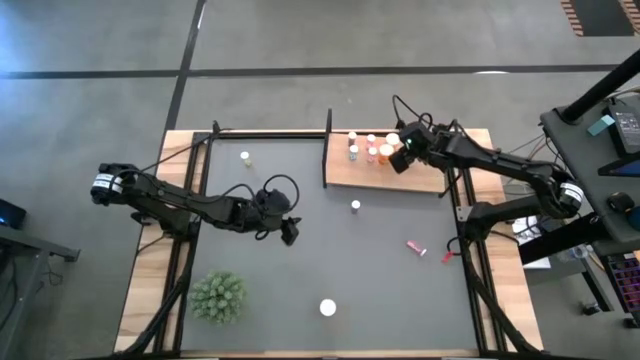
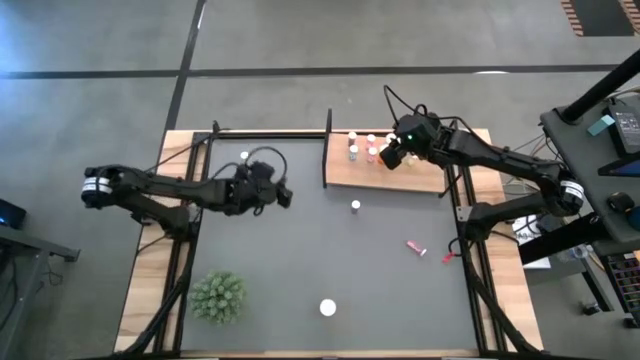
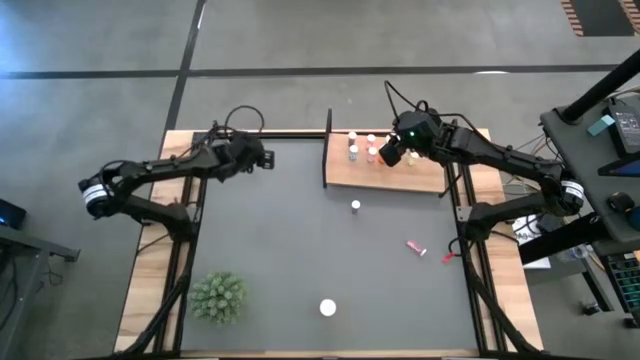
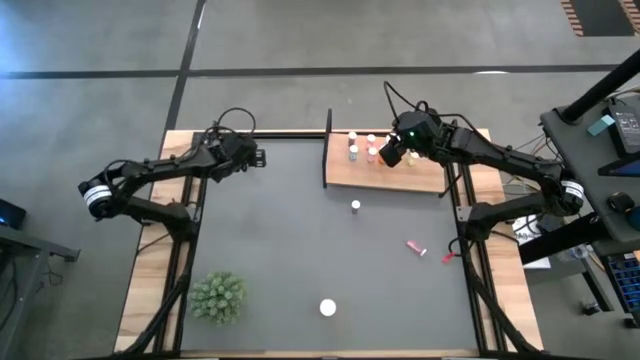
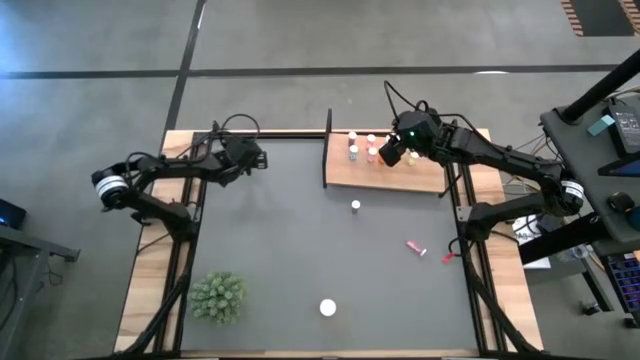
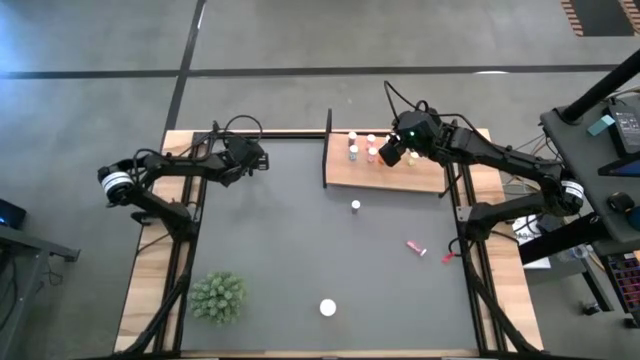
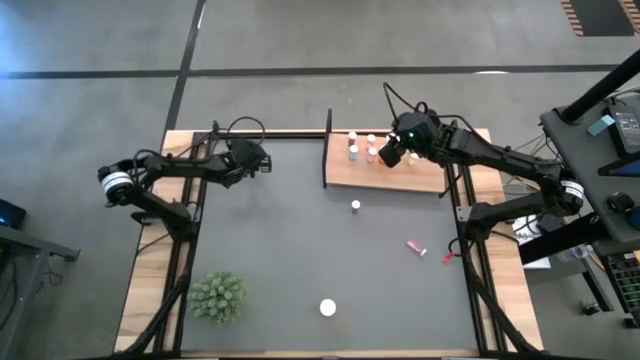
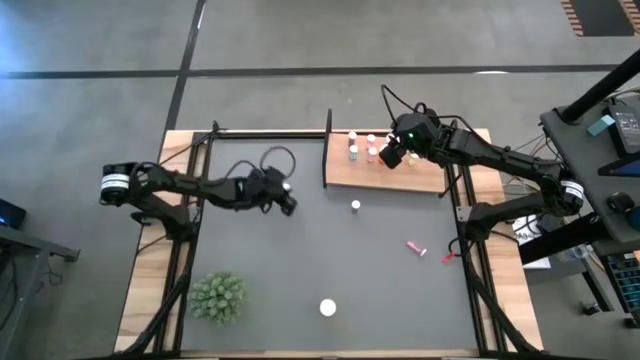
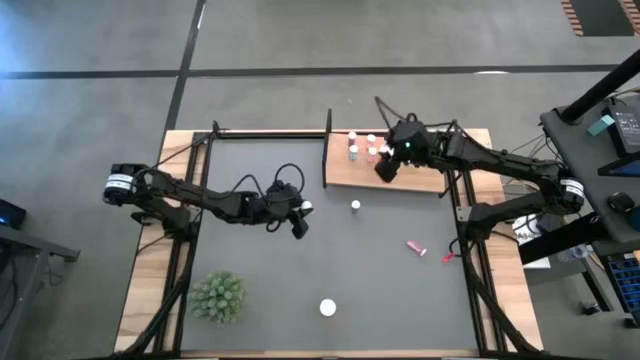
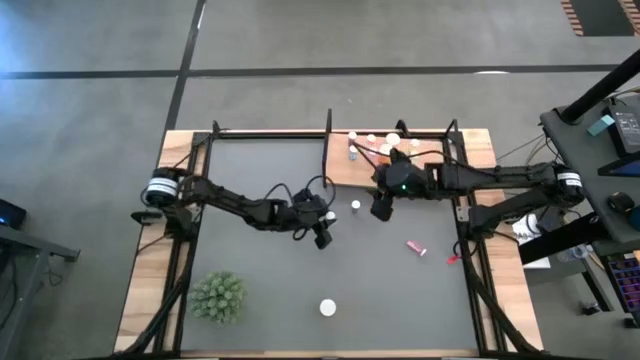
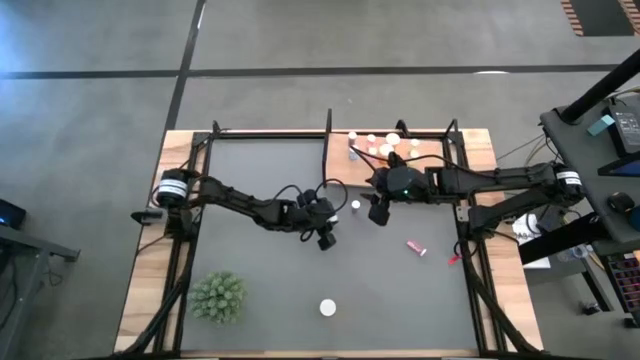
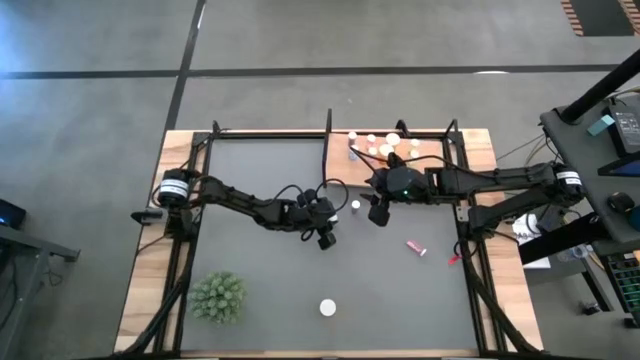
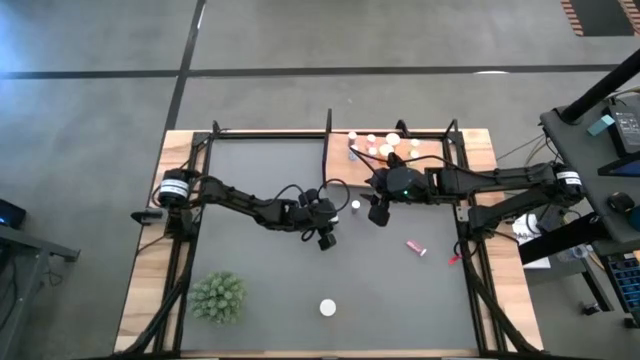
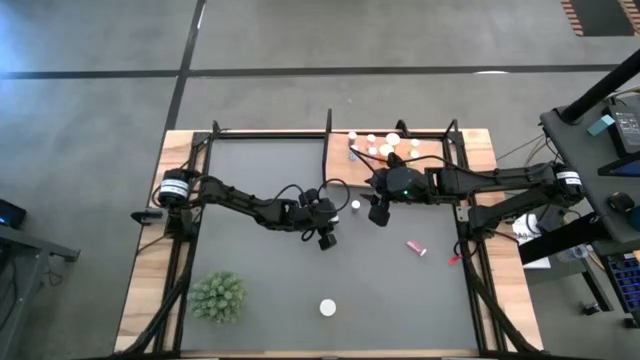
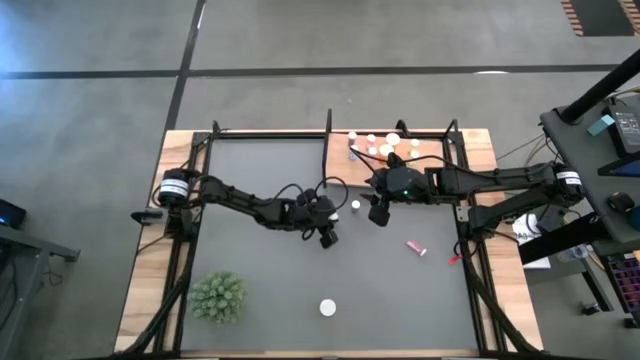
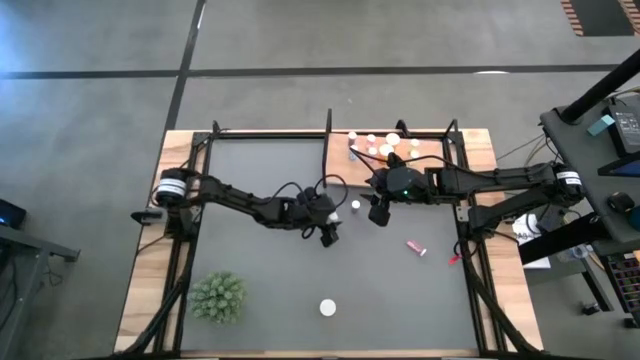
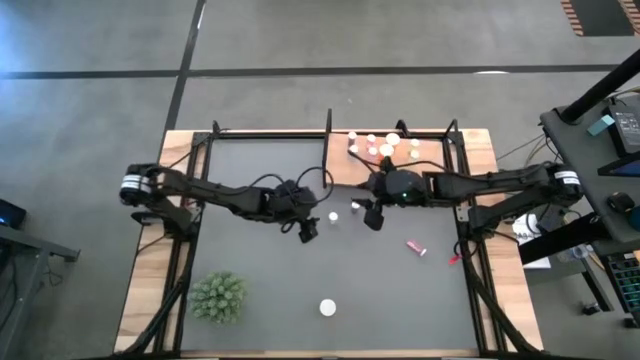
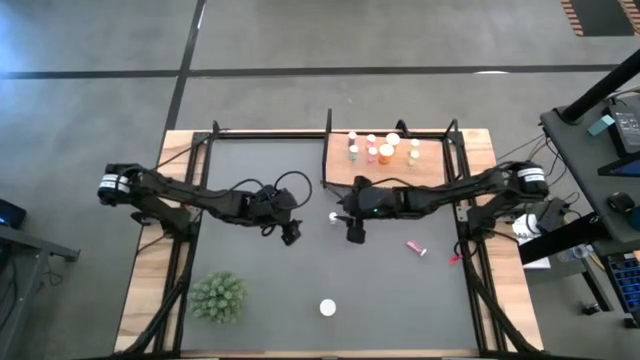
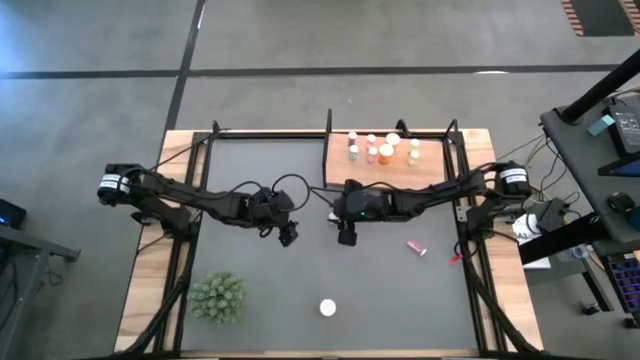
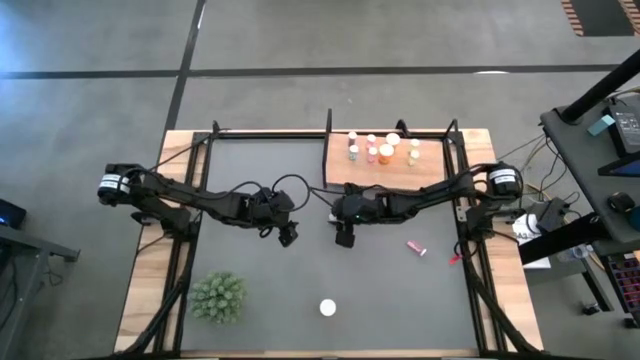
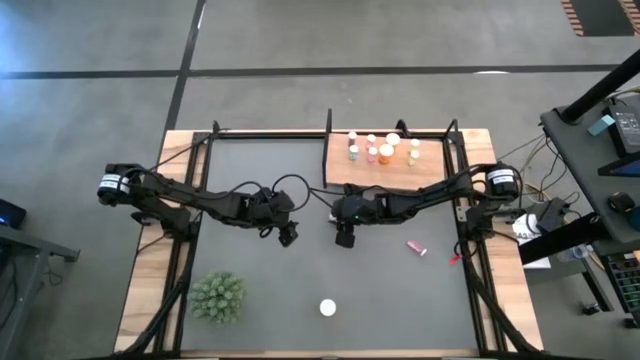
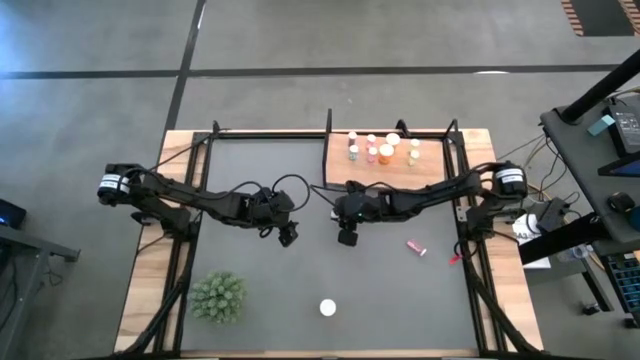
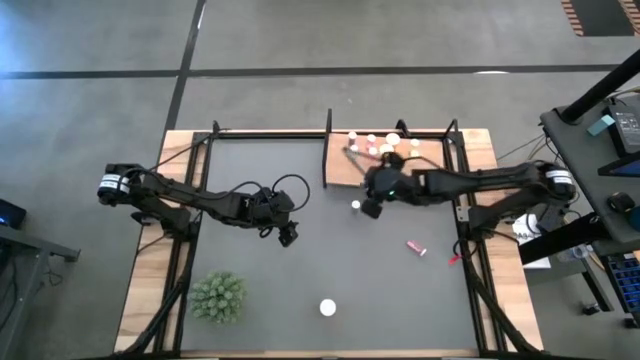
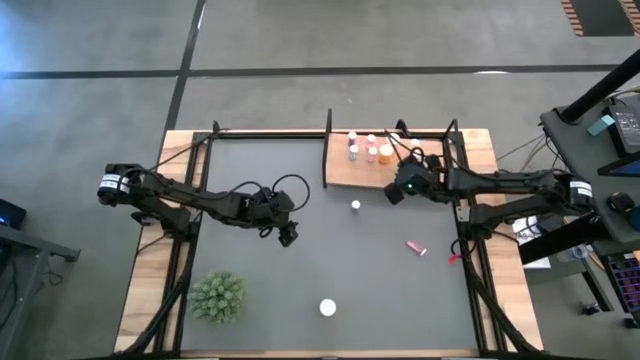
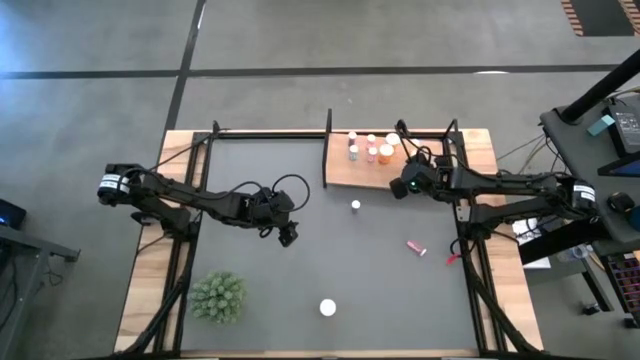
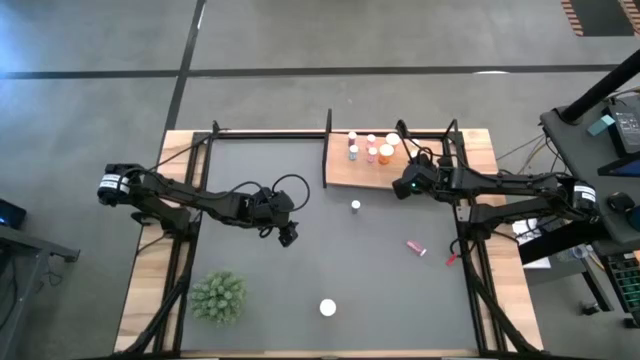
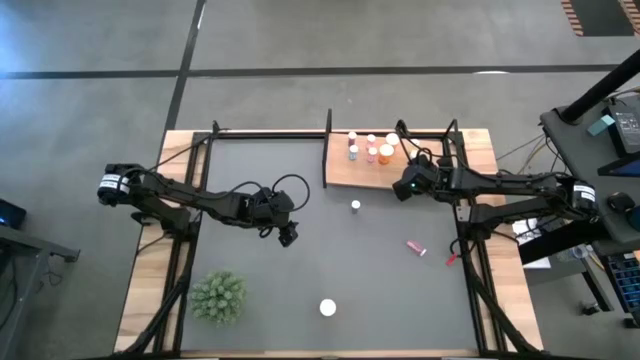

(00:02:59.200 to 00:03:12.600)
Task: Pick and place medicine bottles onto shelf by color
Put the yellow pill bottle on the shelf aligned with the other yellow pill bottles

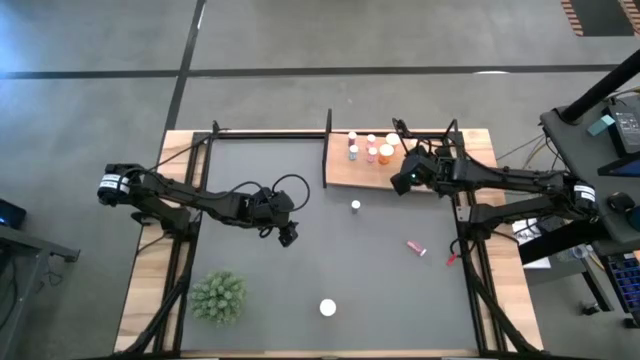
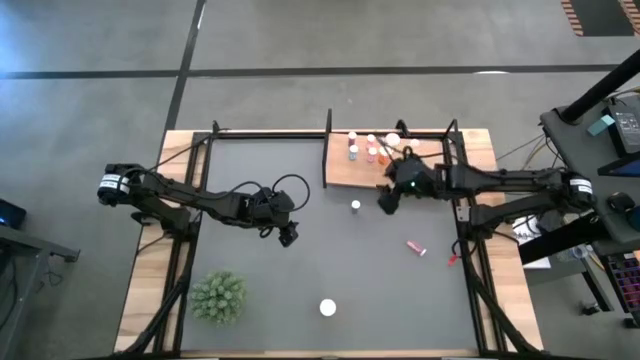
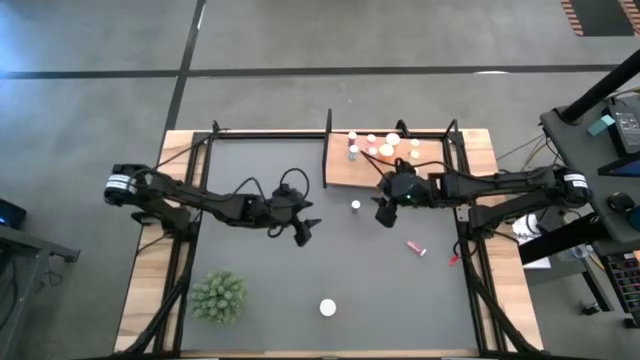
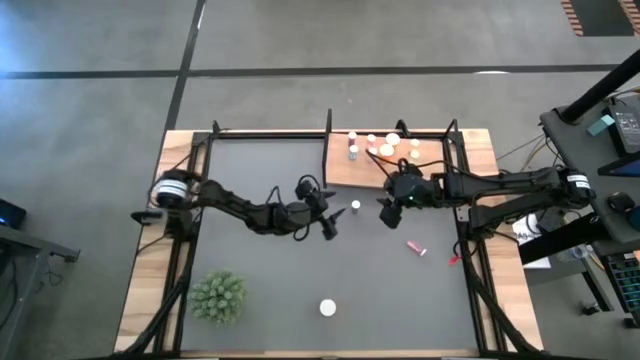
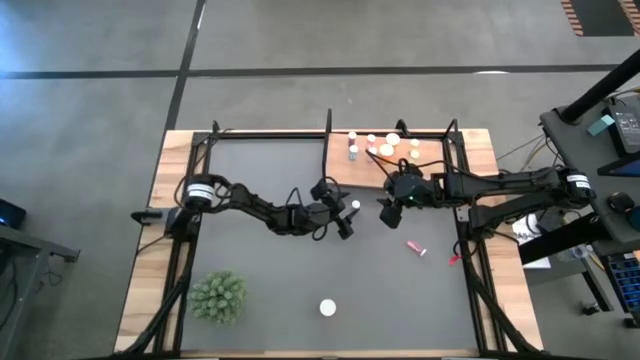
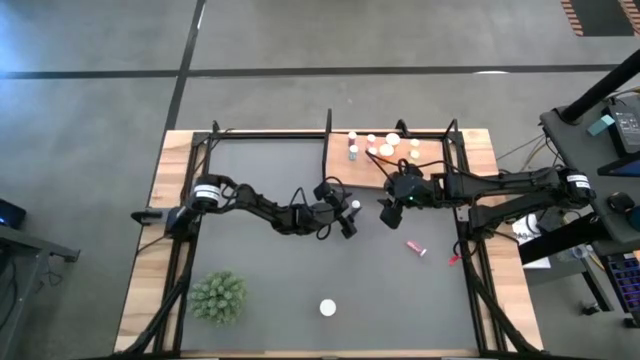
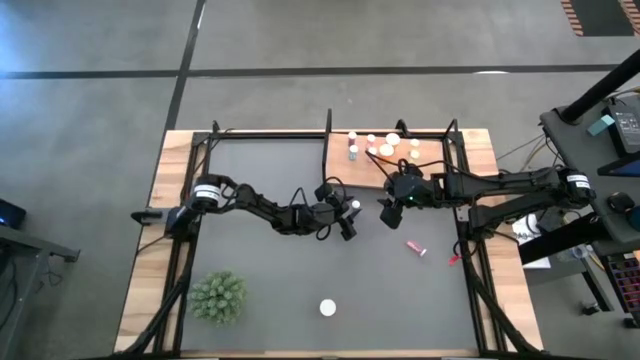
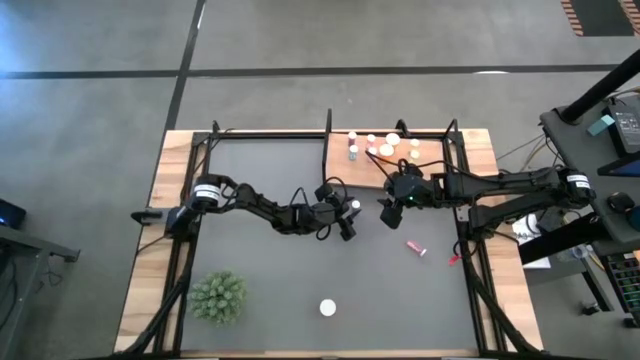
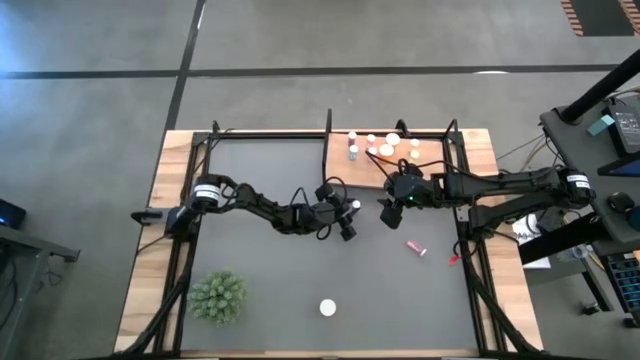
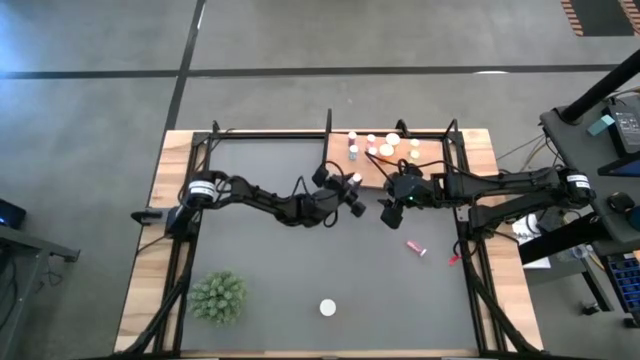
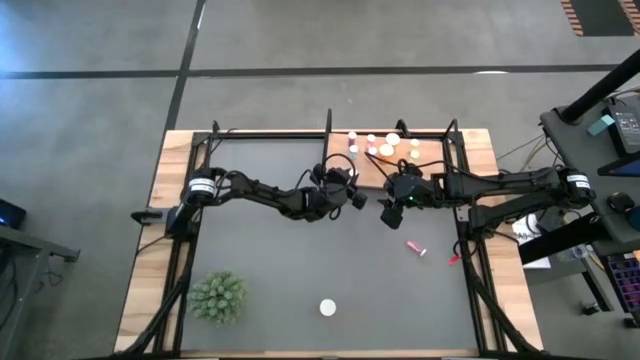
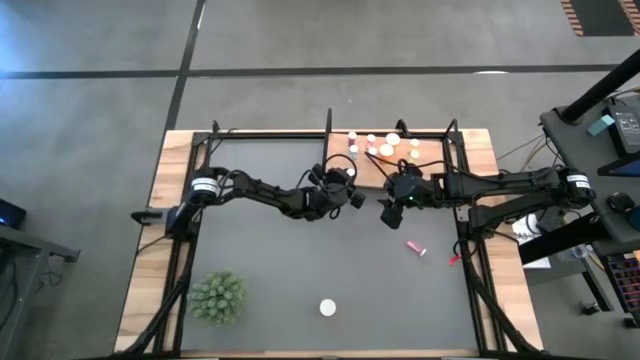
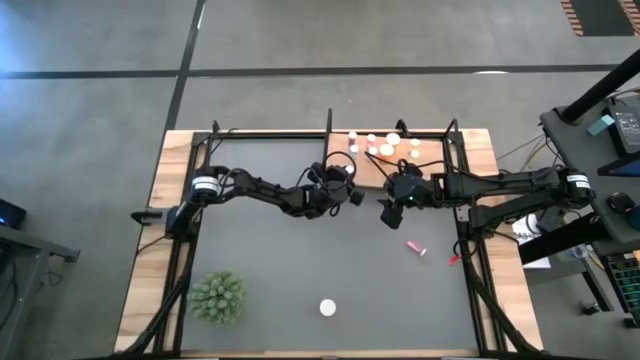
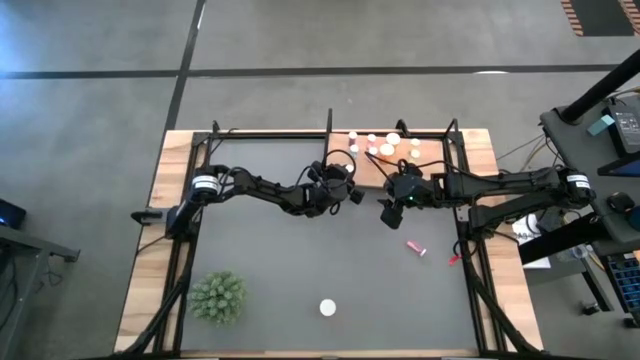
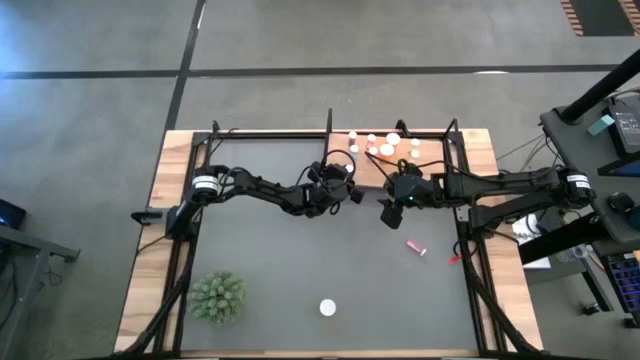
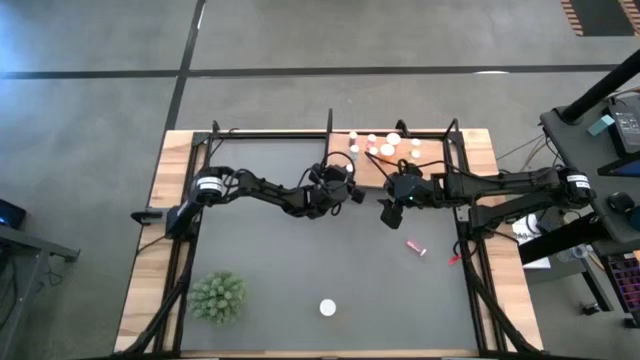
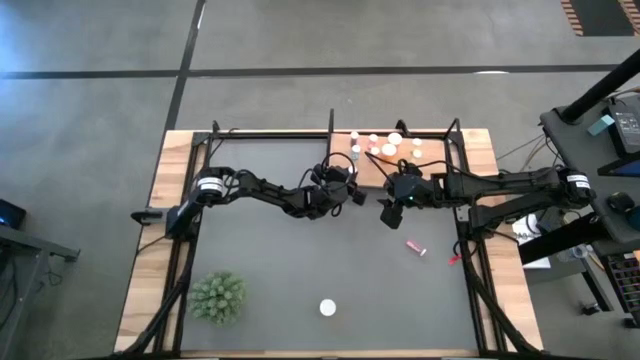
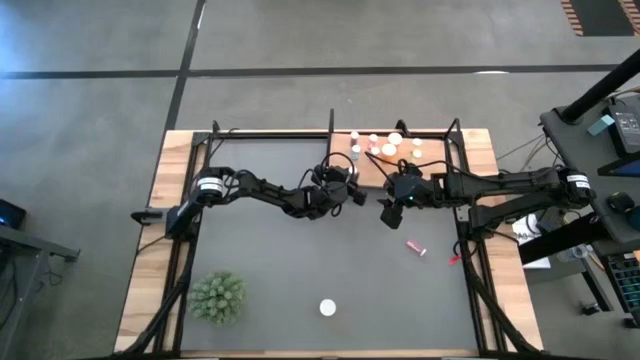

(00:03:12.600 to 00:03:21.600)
Put the blue pill bottle on the shelf aligned with the other blue pill bottles
